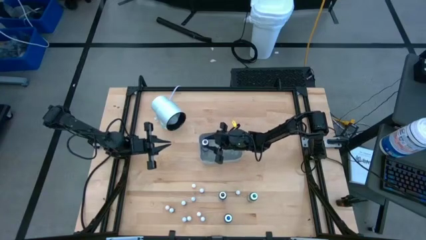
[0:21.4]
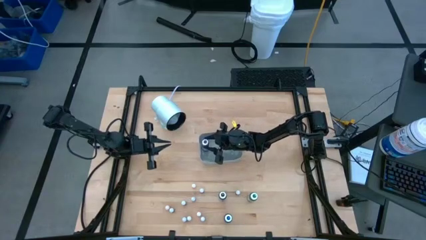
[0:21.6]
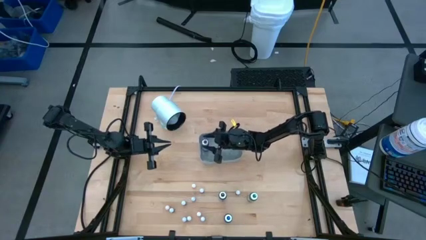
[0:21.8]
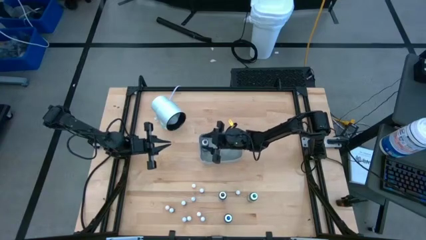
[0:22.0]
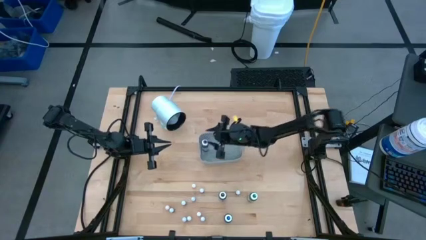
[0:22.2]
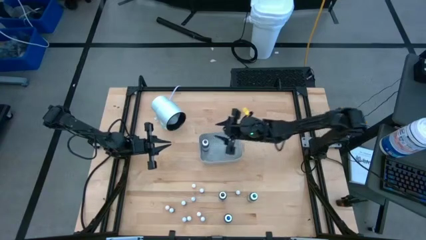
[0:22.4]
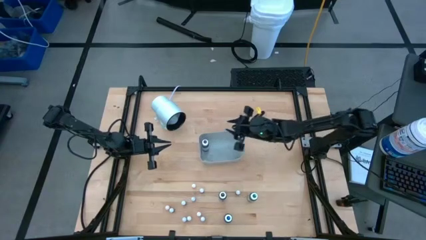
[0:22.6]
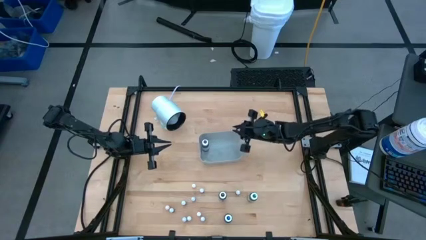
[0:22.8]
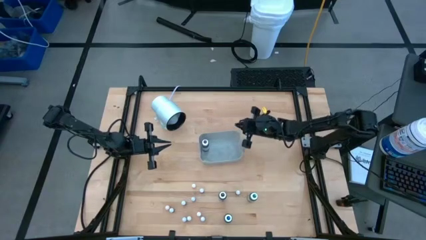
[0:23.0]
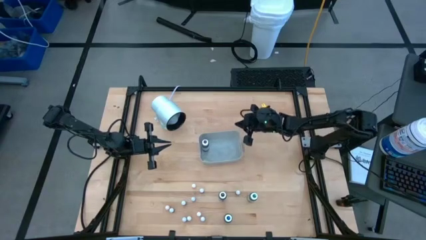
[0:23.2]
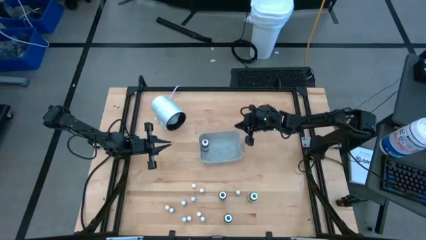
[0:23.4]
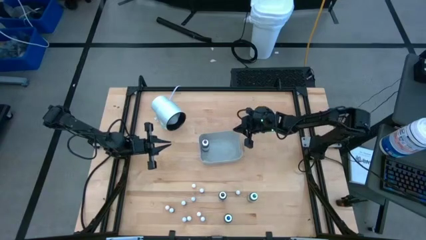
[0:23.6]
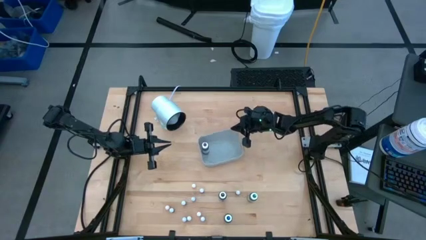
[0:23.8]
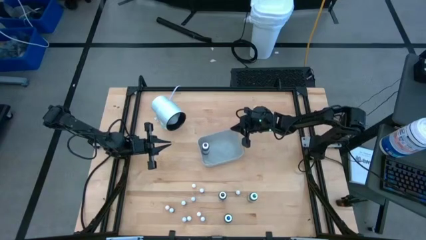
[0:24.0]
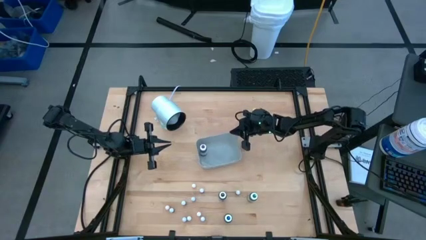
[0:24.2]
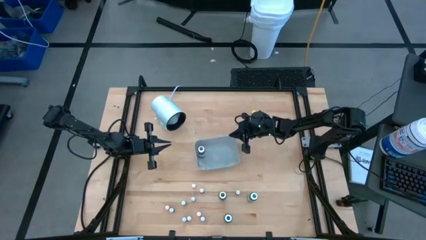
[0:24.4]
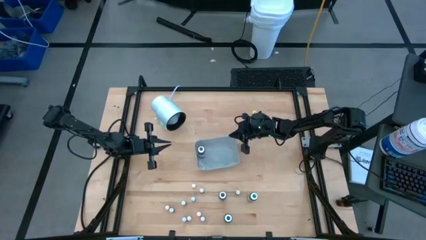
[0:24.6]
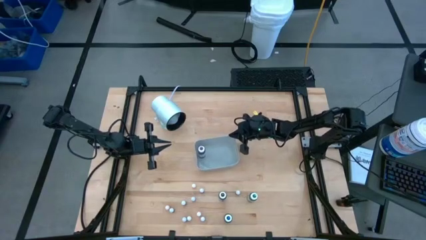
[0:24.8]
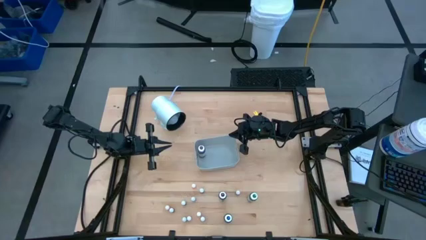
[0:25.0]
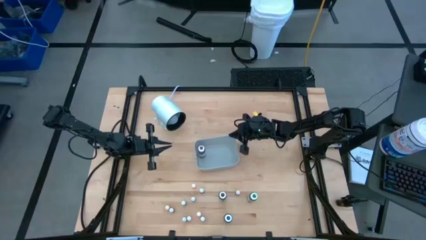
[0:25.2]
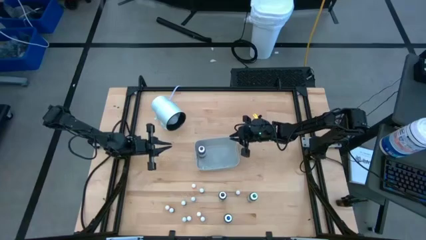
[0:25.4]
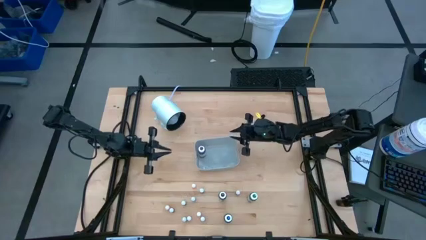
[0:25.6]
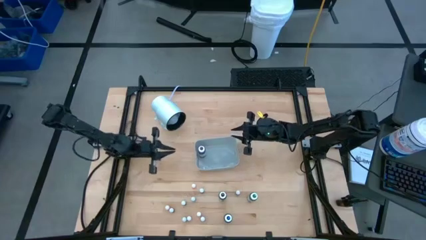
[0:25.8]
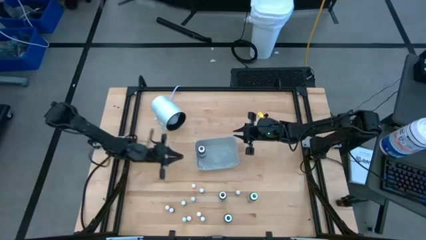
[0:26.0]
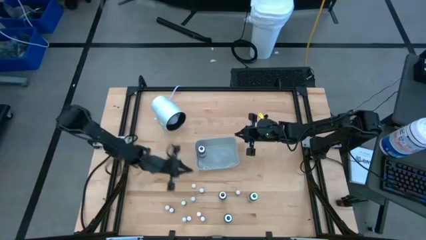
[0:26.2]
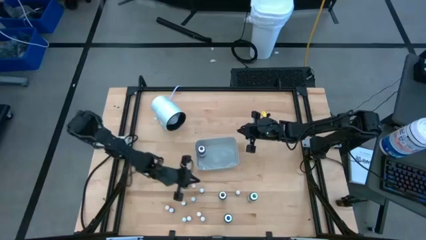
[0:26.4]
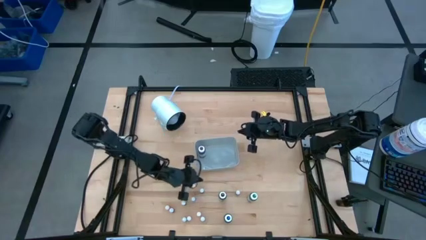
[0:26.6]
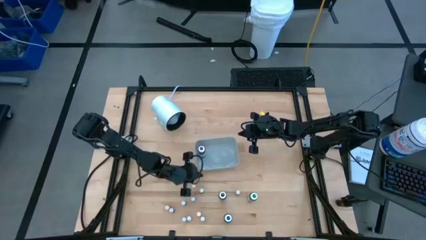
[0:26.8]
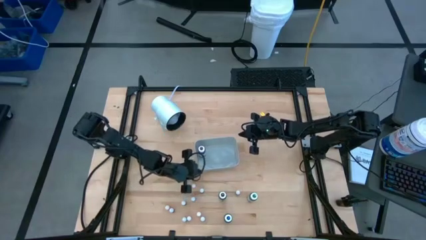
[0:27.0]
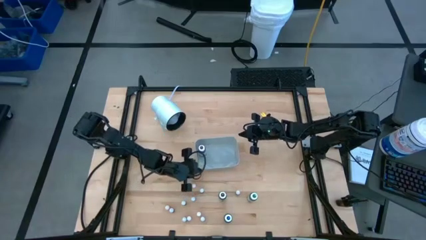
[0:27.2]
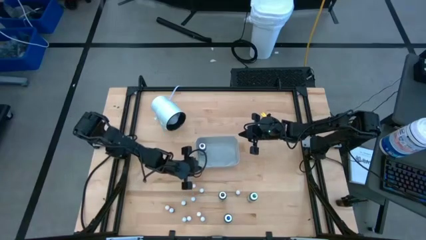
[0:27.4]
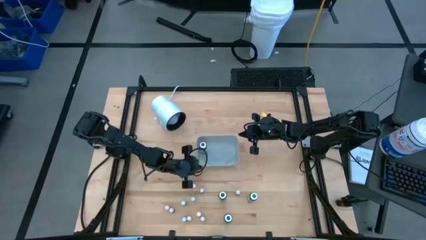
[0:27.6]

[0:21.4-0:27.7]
Task: Pick & Place food coloring
Adjust the gray bin

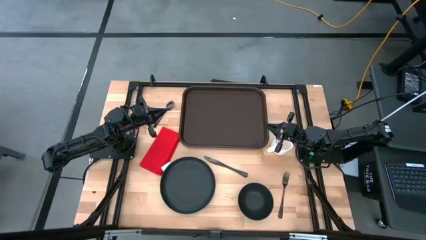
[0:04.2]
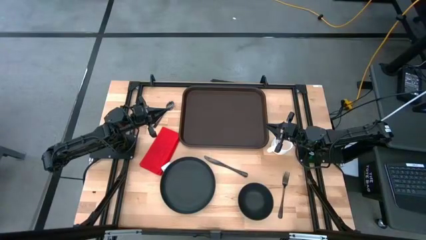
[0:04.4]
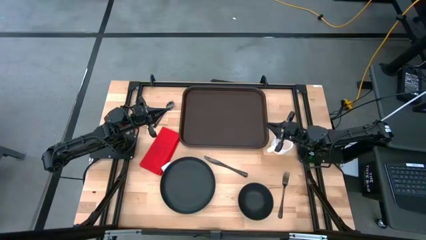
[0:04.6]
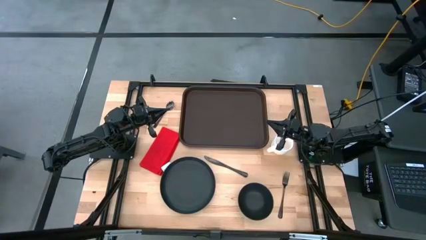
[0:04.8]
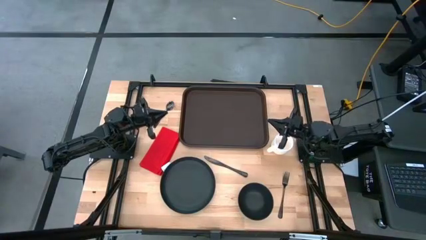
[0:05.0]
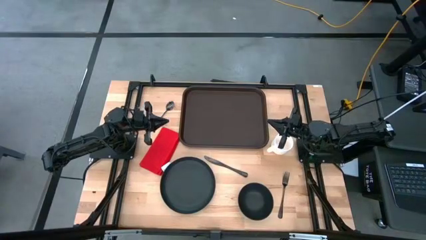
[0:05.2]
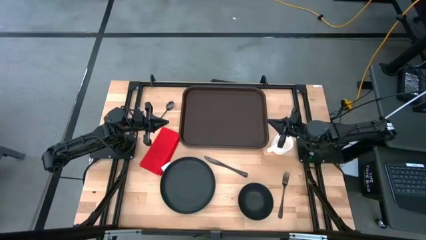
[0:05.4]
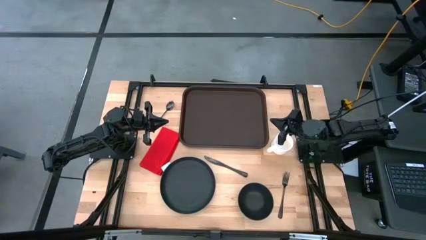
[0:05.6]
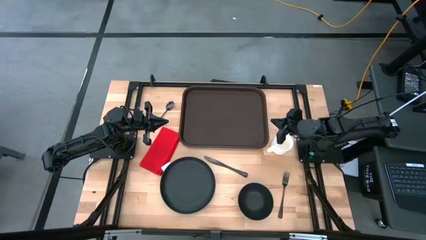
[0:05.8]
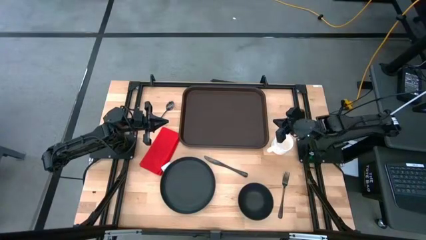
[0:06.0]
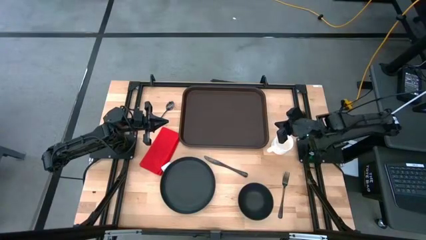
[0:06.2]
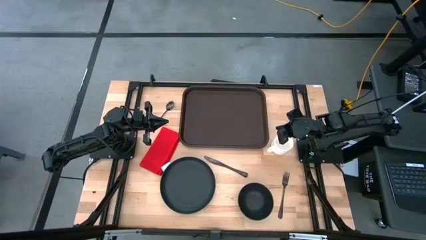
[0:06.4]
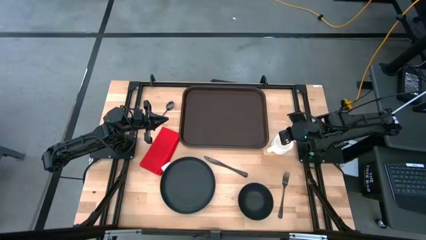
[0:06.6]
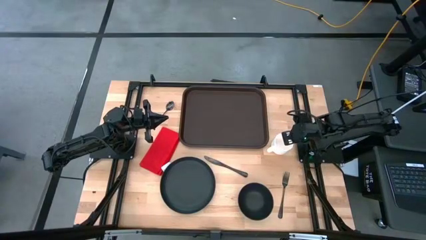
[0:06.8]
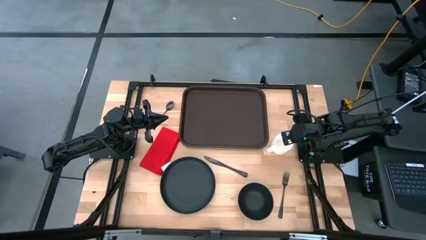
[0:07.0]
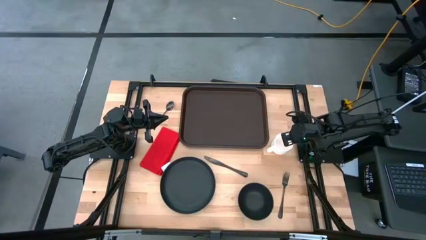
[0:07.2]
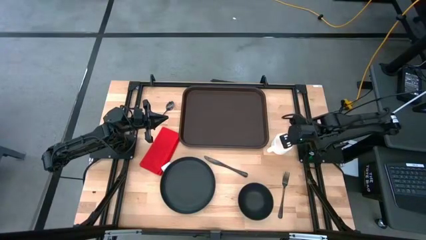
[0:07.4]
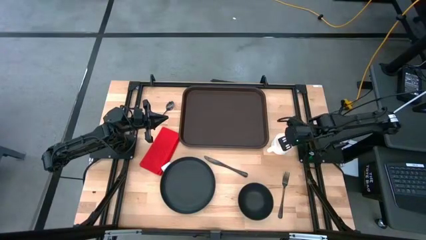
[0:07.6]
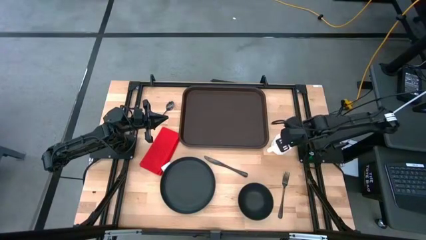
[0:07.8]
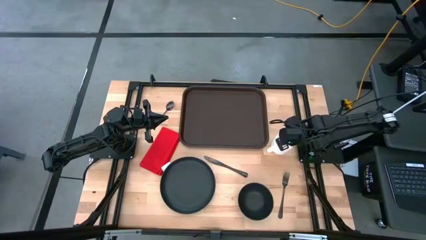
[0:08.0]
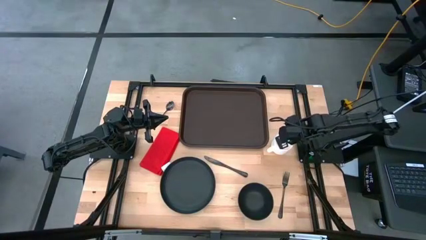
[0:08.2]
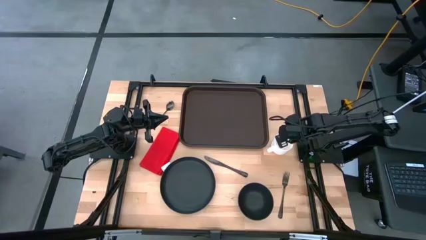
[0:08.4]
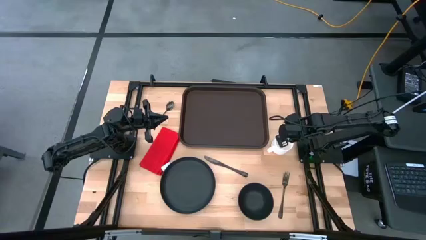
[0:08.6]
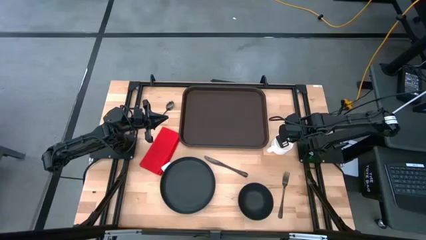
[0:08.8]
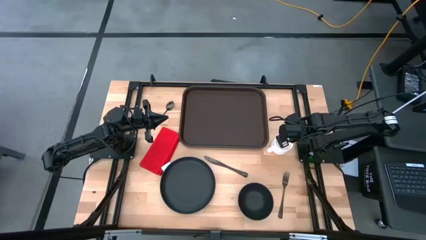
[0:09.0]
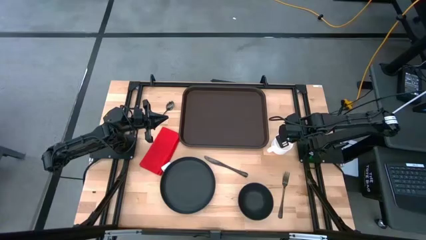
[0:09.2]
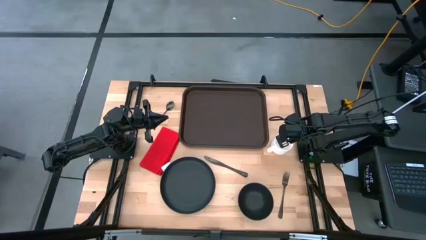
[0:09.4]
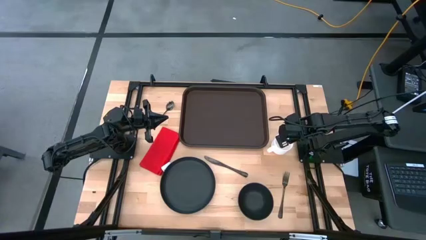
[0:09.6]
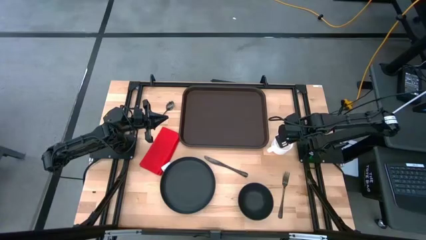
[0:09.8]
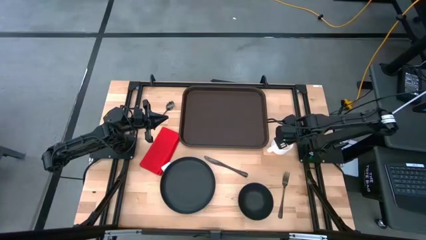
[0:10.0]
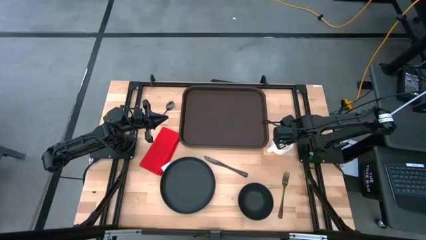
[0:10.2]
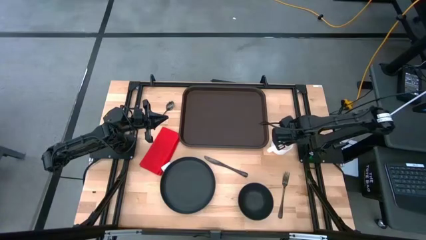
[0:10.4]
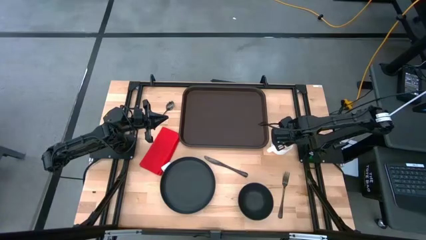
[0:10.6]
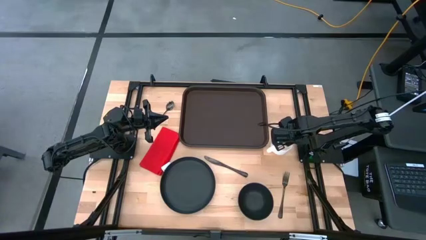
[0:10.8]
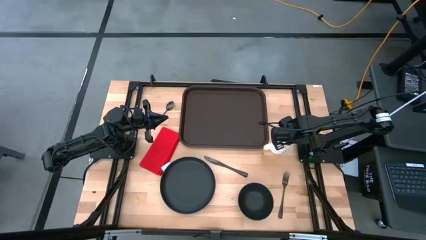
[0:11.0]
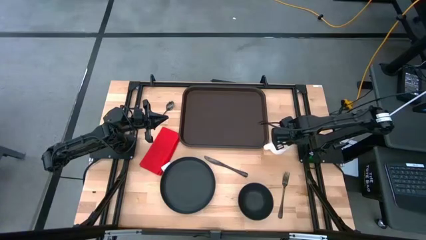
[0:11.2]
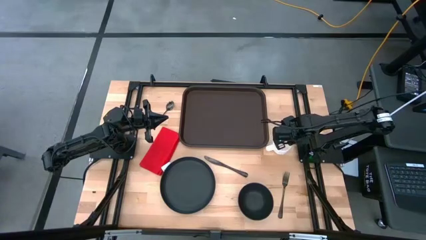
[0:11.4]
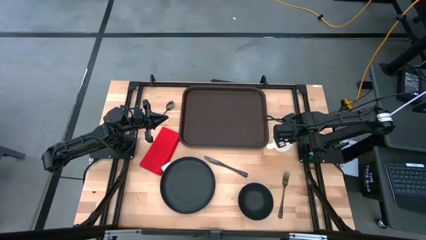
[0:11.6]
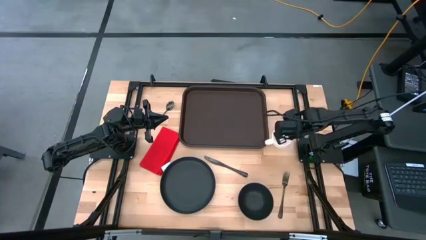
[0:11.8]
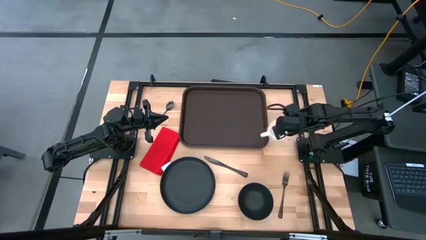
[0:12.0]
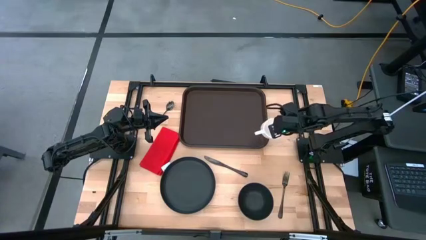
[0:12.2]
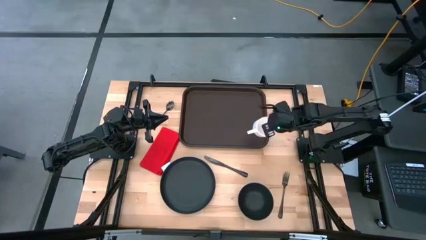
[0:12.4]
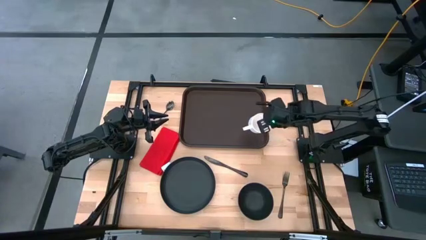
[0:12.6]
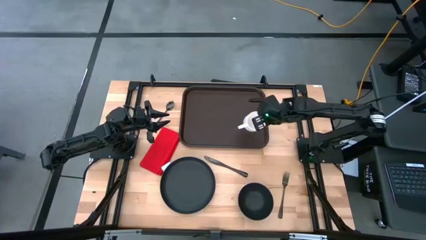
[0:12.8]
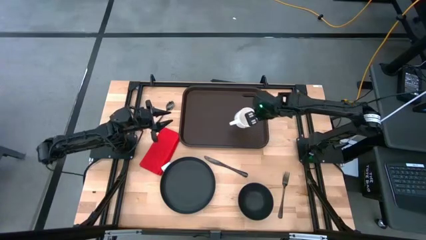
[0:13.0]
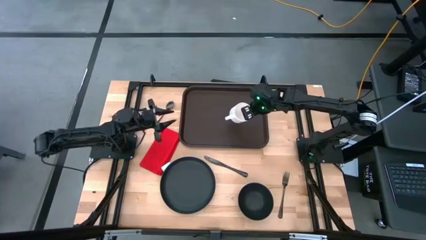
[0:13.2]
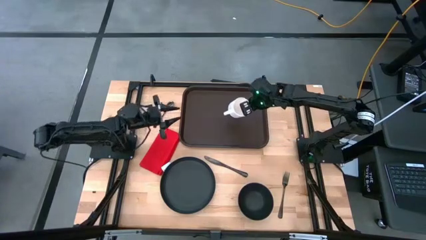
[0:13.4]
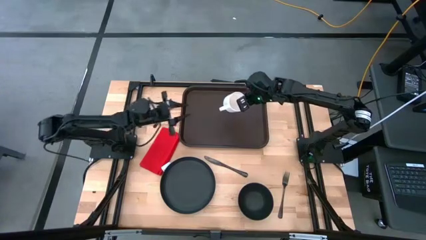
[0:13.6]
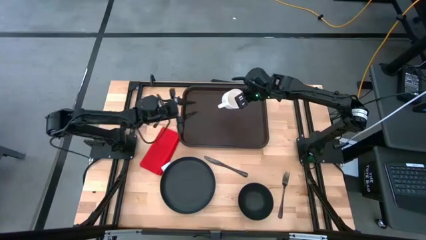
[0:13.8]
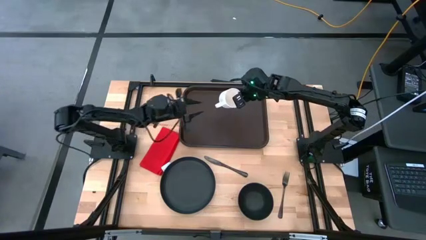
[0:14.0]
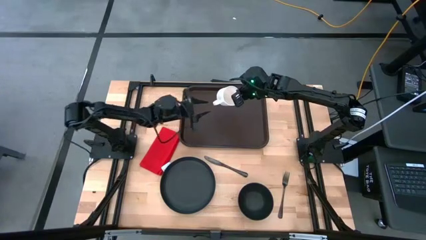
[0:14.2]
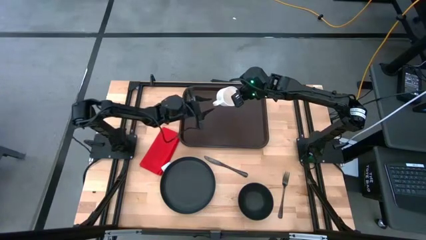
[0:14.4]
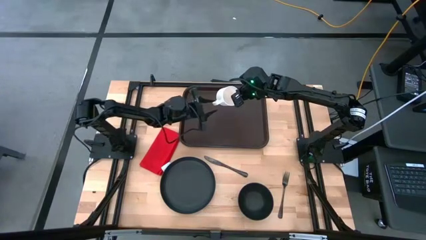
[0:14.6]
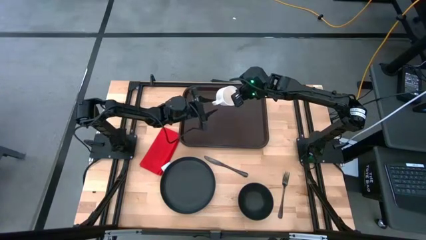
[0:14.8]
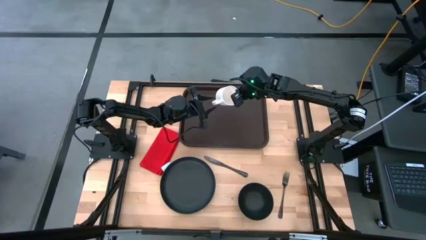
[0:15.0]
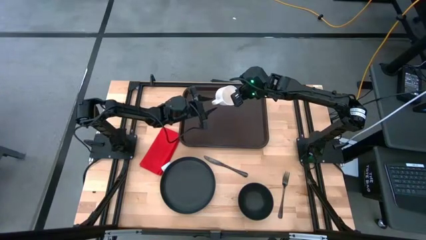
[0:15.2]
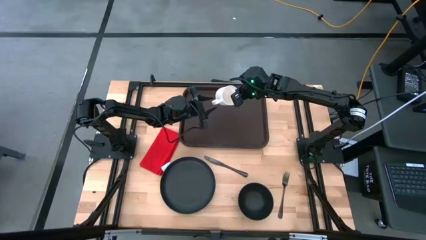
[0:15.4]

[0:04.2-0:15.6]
Task: Set up tray
Put the white mug on the brown serving tray
